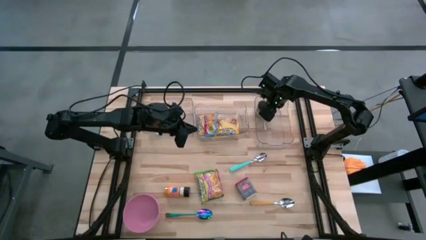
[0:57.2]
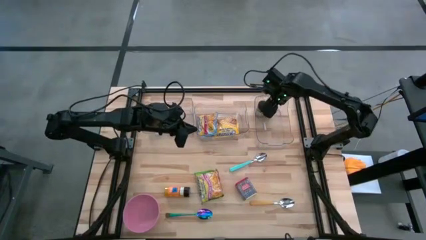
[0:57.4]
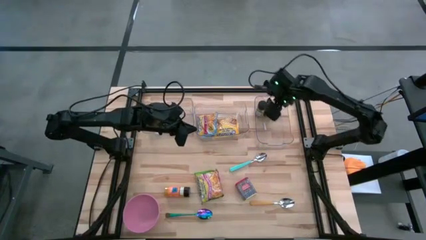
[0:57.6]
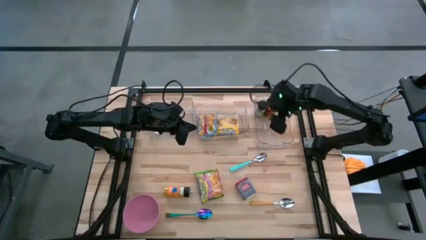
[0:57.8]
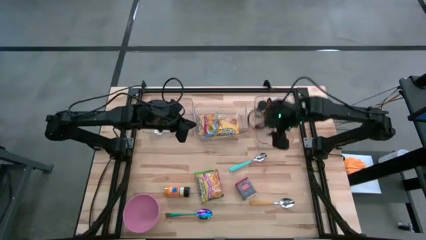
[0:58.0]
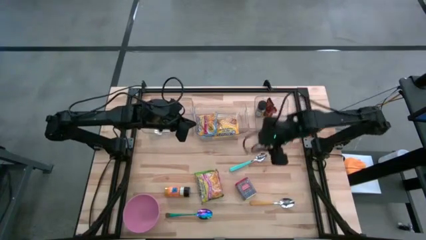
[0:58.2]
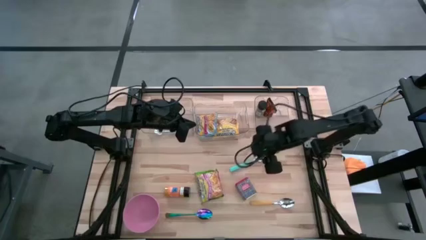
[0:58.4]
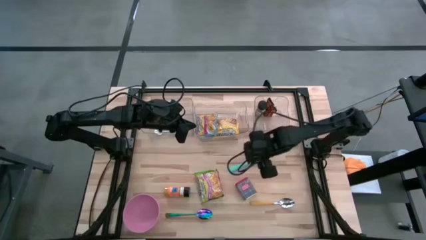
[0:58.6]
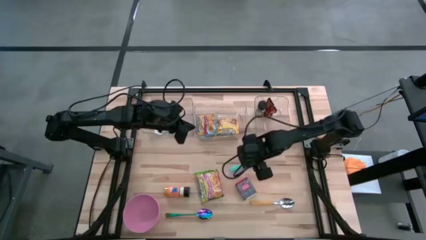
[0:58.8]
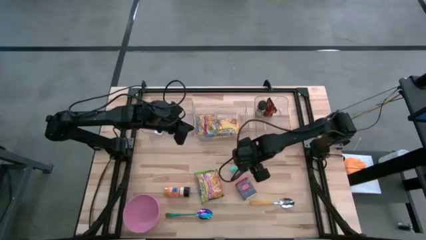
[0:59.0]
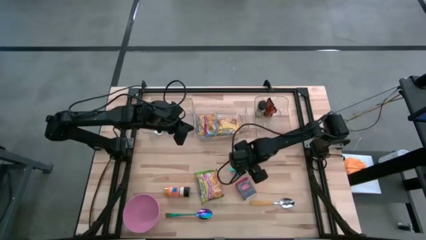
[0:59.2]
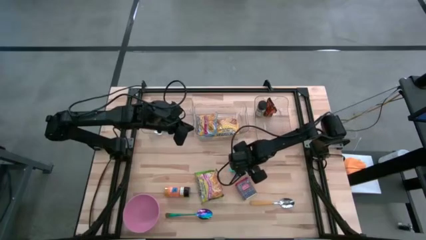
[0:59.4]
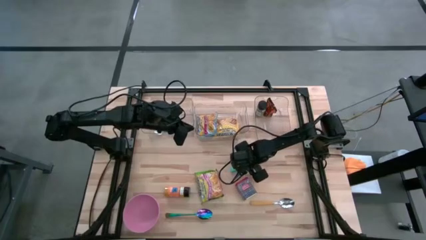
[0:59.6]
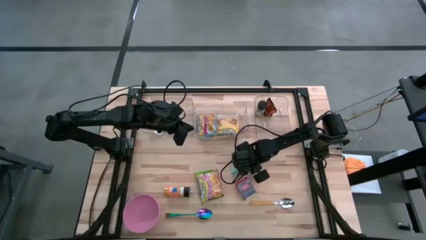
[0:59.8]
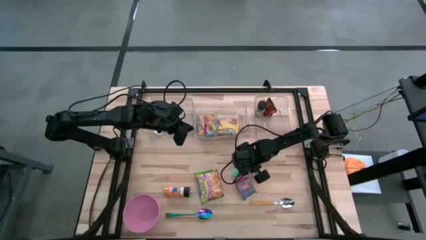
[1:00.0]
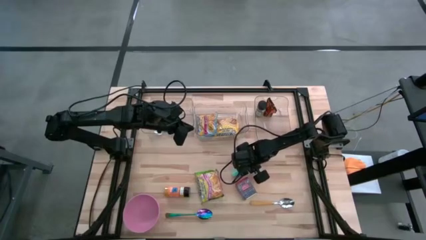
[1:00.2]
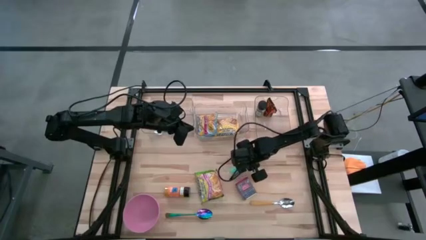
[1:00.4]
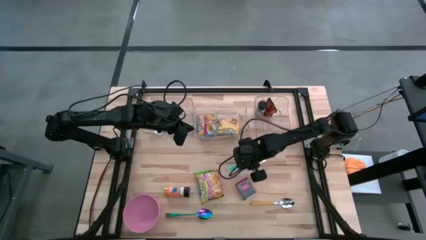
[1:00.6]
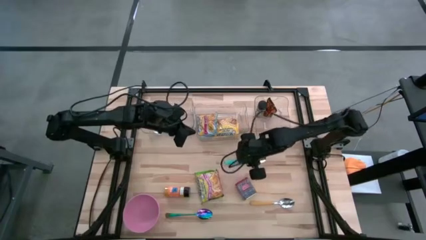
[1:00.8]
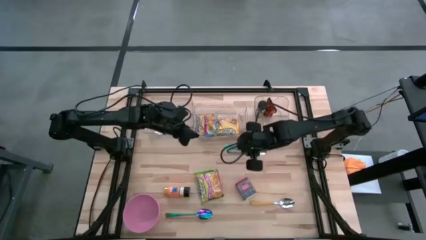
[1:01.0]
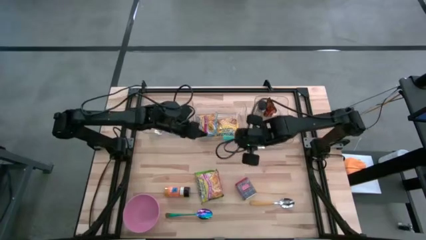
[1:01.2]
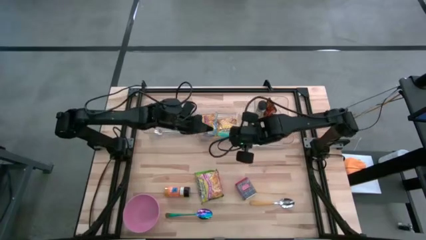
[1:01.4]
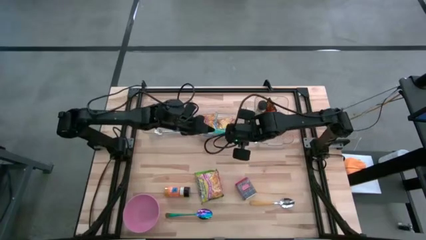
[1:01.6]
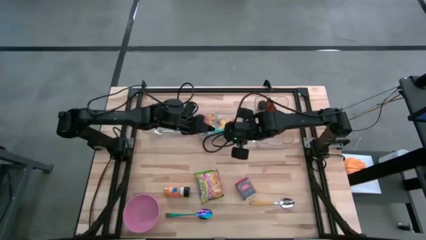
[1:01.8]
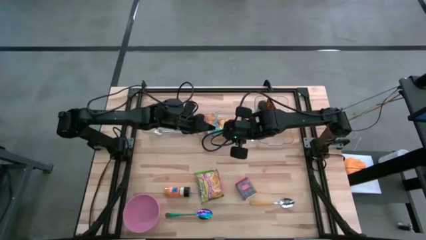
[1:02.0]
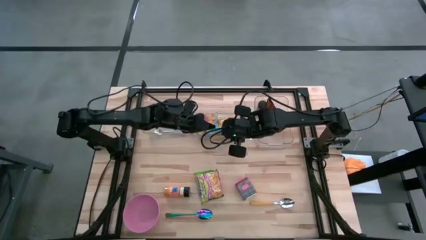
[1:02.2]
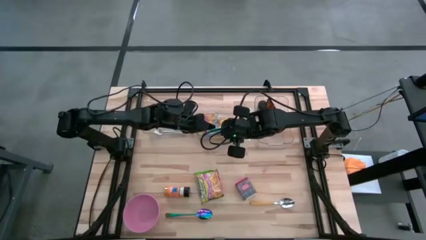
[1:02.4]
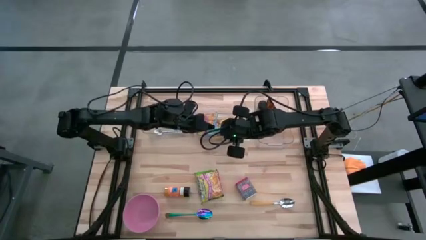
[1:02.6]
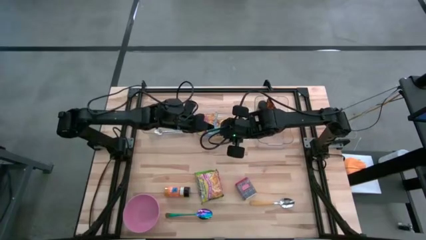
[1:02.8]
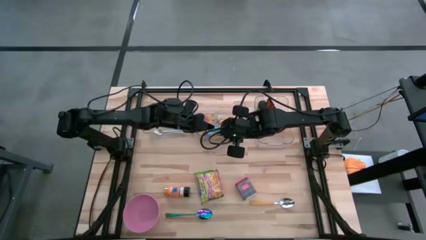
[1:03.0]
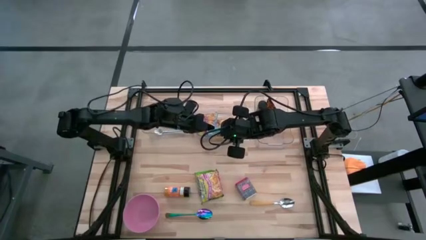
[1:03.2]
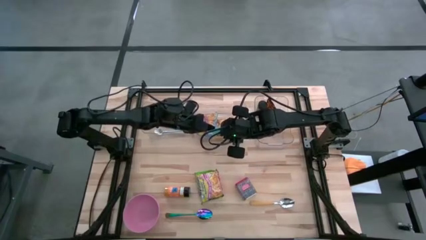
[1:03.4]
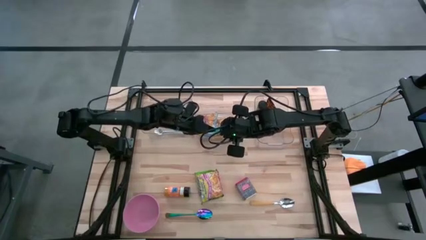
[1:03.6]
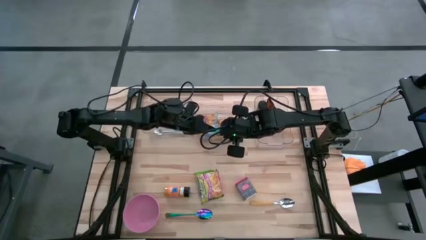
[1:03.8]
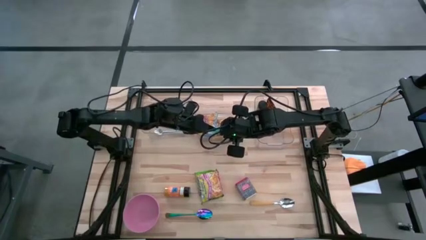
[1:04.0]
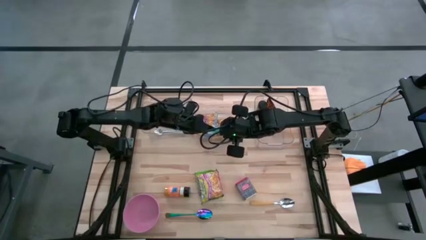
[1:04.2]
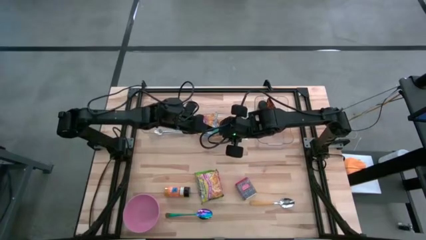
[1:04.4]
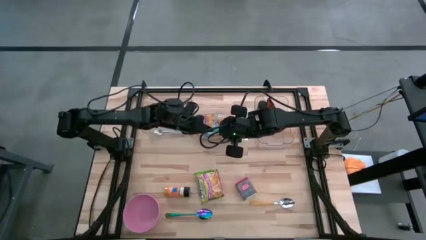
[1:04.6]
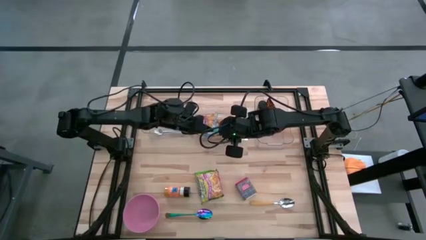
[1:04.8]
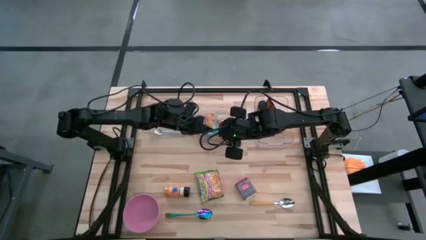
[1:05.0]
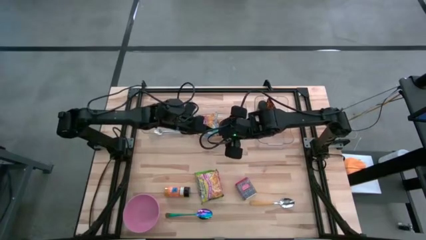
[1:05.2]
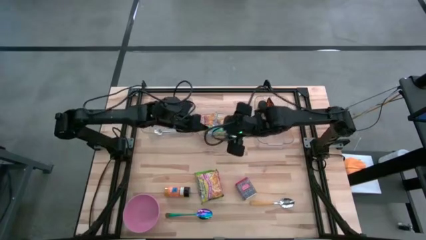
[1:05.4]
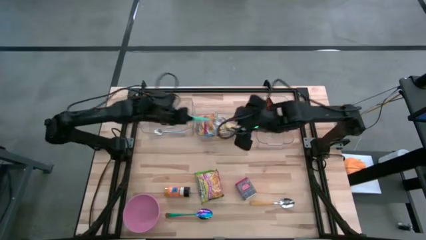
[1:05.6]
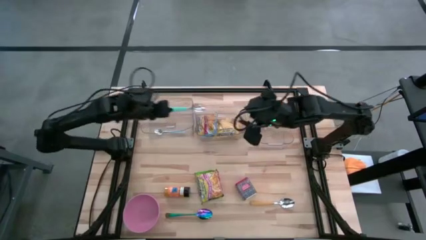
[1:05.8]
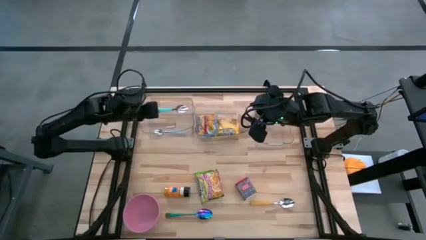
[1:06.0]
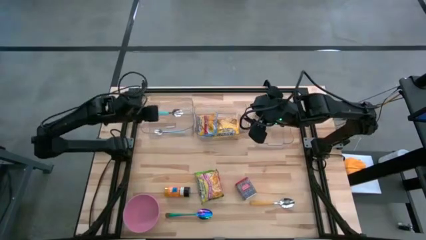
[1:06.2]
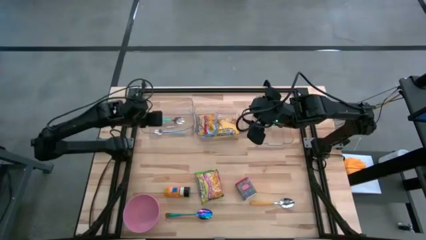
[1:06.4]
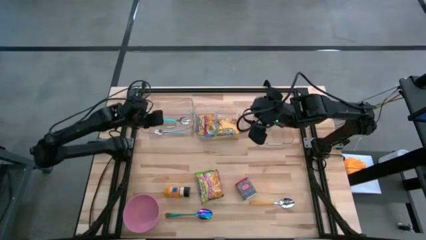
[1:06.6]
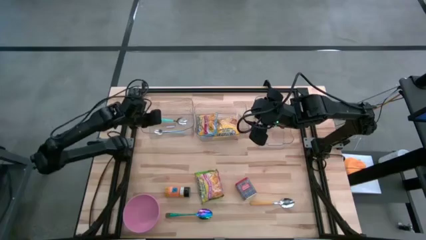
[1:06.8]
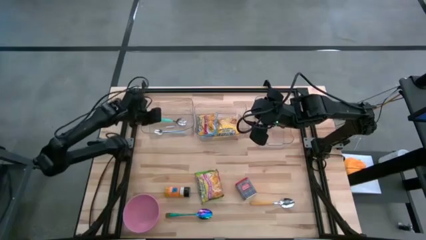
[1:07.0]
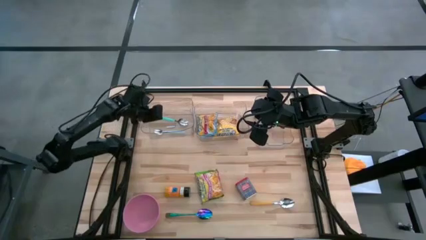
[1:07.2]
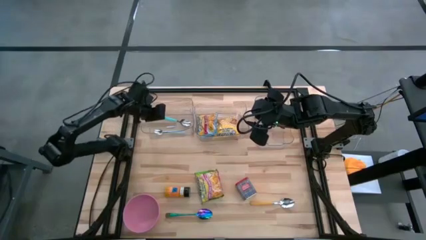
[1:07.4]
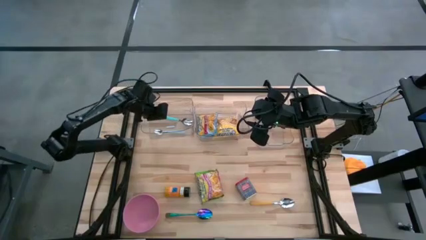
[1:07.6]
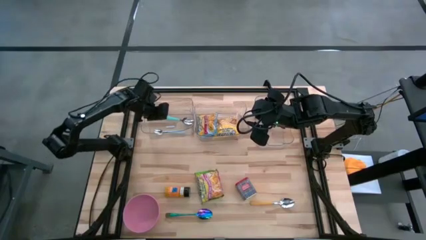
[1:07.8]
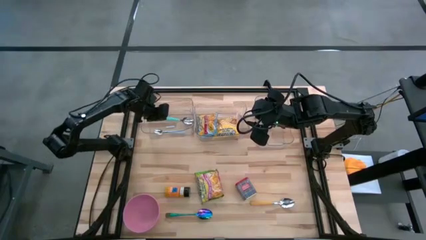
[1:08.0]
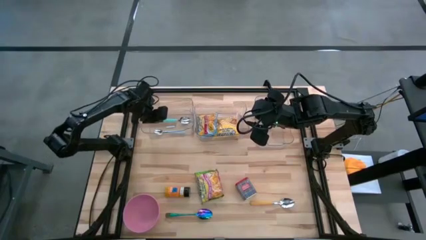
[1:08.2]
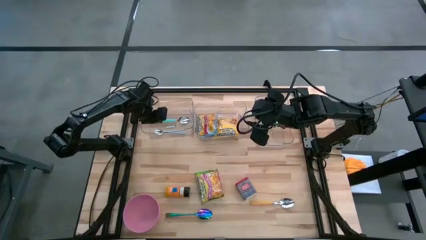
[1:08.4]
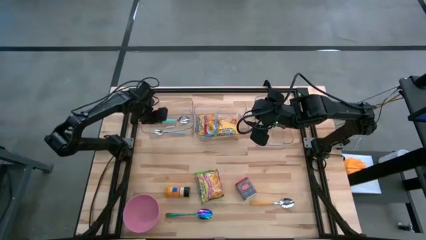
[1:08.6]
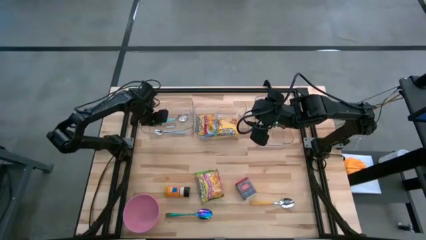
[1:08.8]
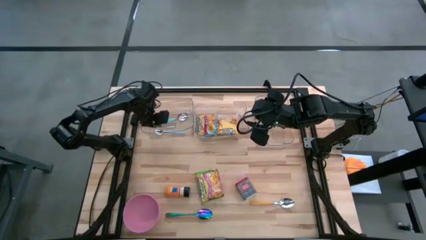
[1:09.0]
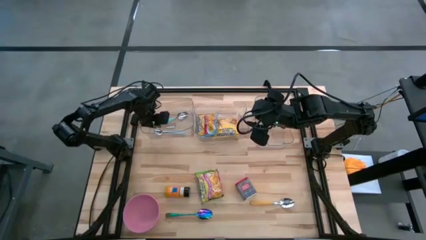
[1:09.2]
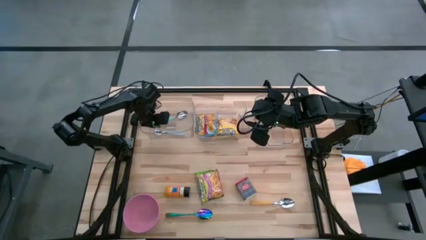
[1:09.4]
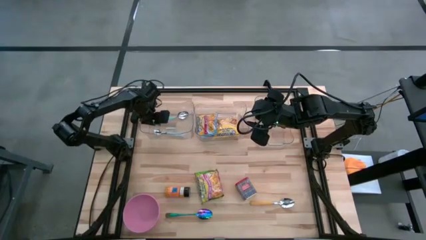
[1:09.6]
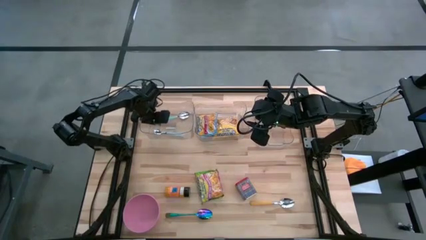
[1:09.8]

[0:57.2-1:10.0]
Put the blue spoon into the left transparent bin

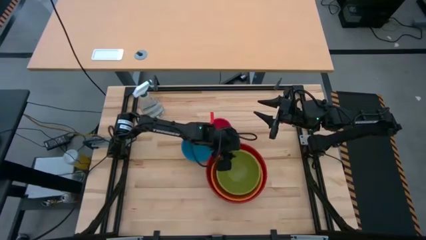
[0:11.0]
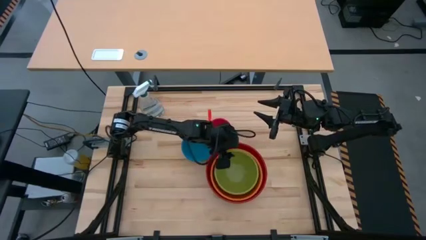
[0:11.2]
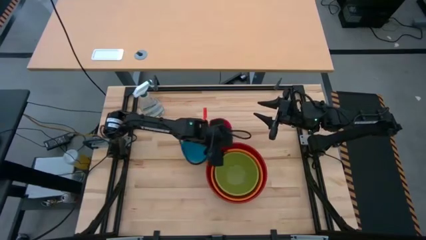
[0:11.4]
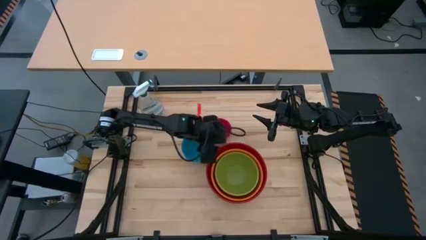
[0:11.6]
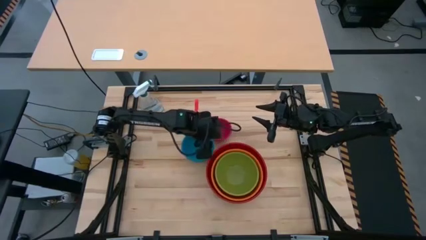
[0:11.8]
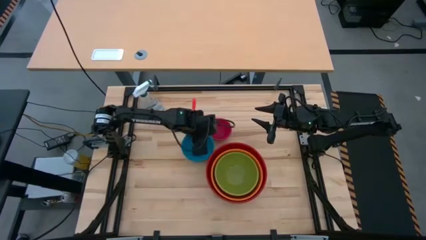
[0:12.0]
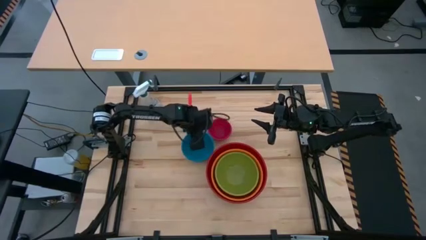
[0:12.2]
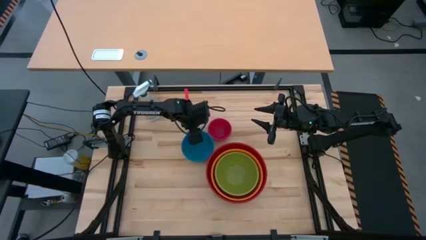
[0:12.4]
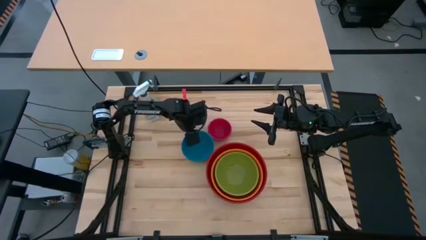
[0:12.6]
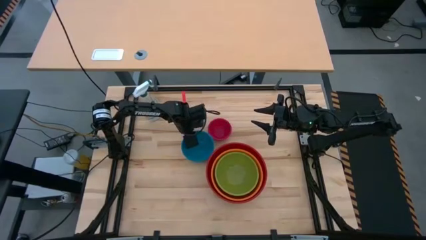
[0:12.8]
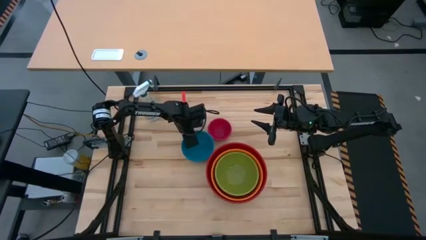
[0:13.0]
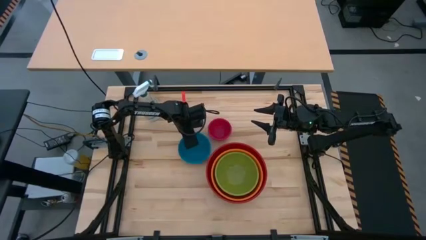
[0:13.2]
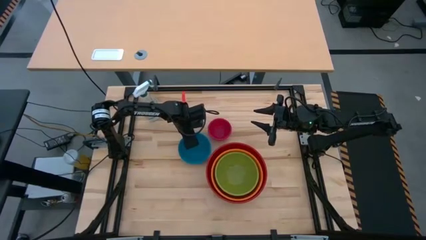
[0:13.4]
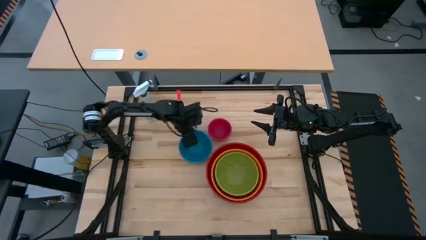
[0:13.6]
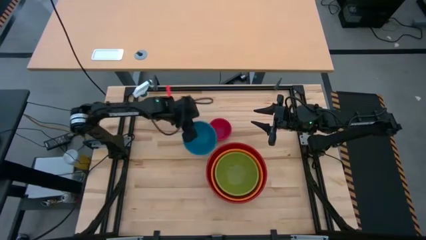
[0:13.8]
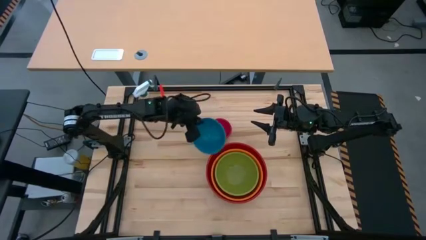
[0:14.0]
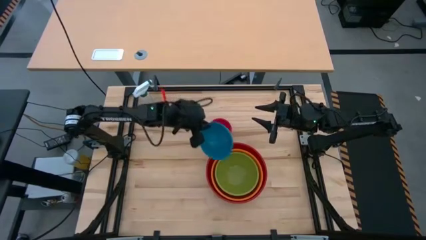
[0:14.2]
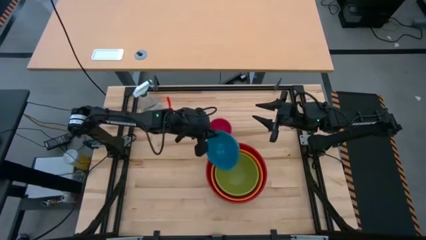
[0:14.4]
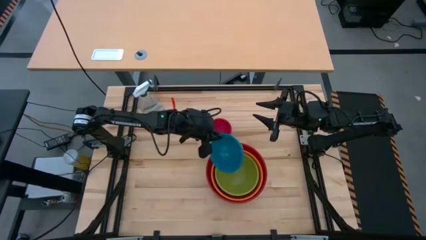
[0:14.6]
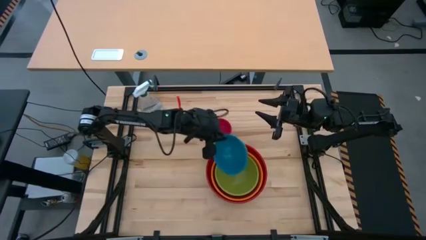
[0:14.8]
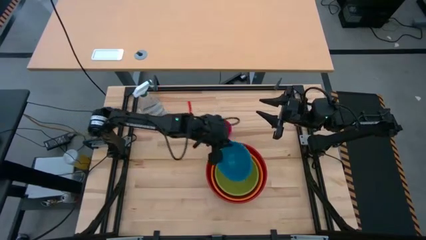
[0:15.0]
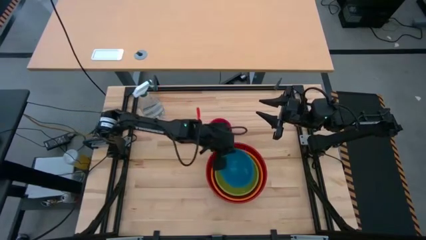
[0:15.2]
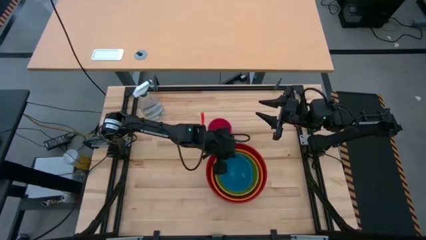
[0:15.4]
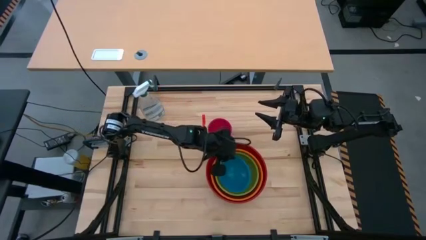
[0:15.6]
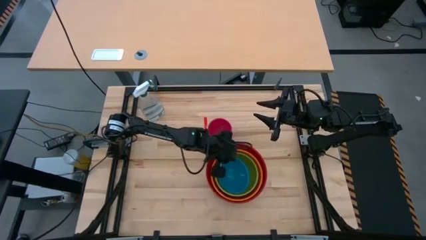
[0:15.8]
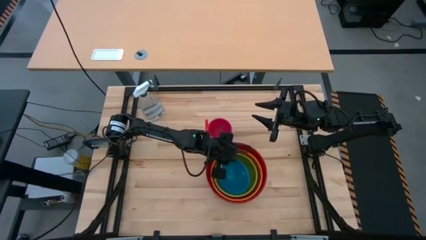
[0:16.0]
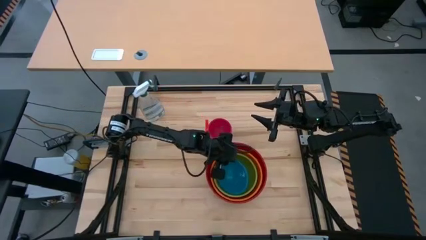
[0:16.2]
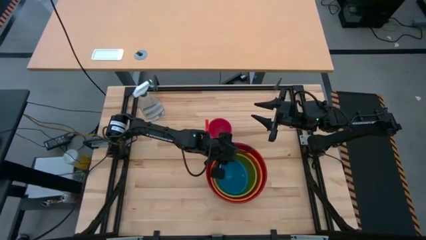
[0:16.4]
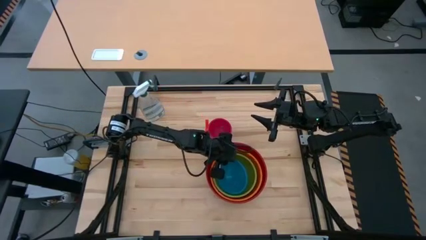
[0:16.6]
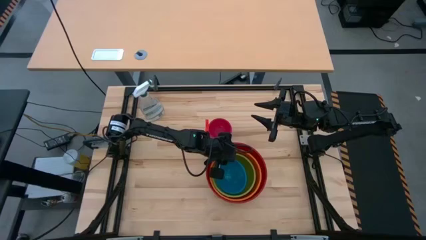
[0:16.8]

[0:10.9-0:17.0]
Stack the blue bowl into the light green bowl
